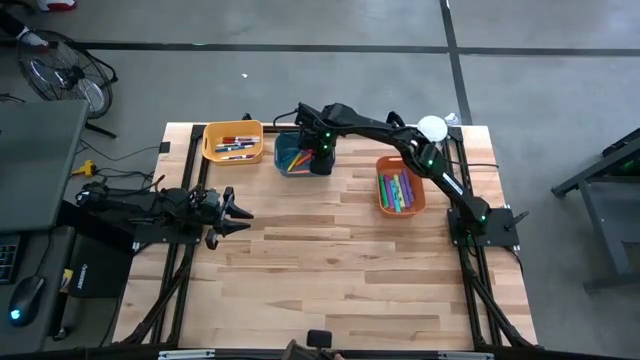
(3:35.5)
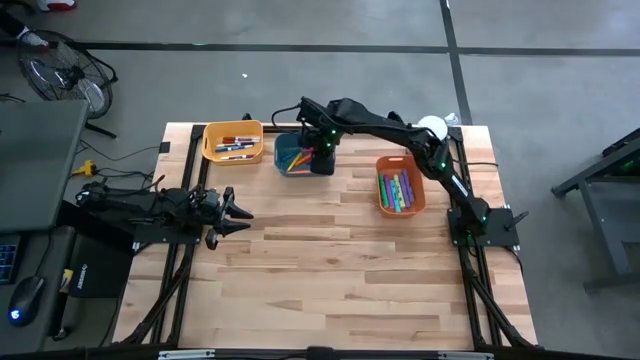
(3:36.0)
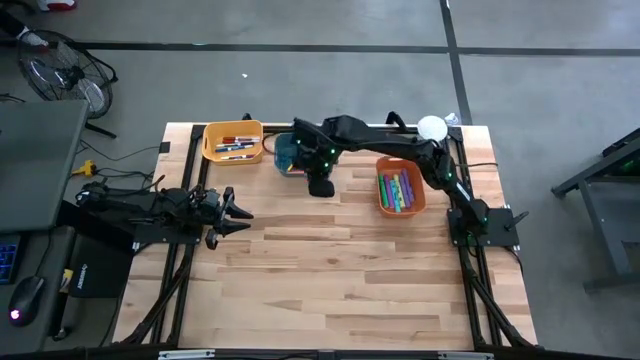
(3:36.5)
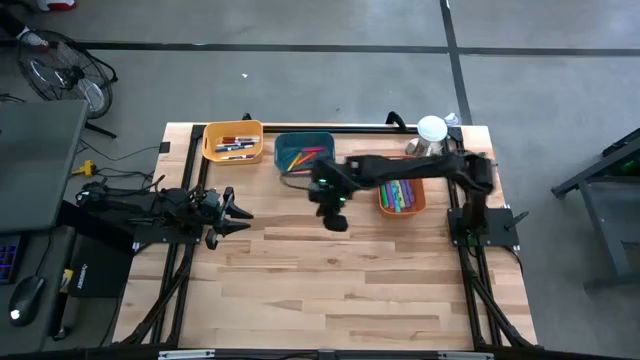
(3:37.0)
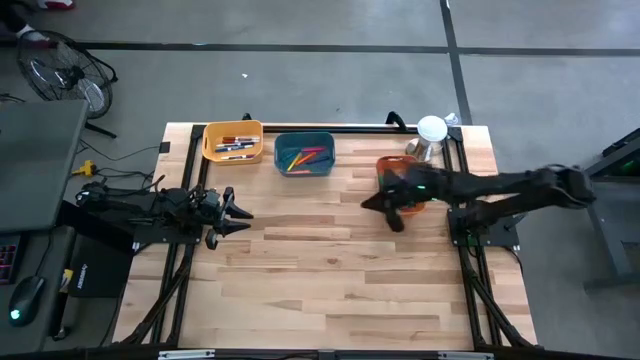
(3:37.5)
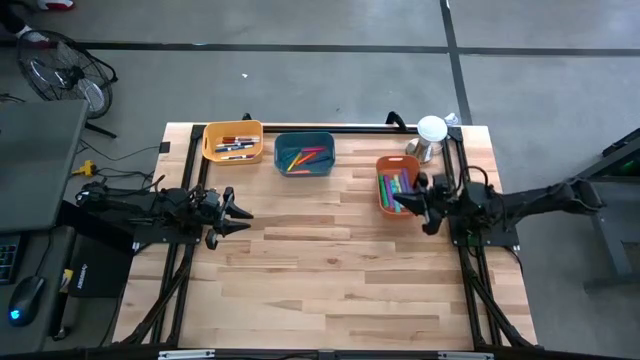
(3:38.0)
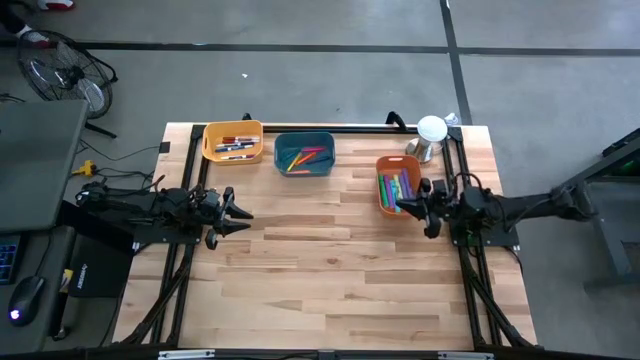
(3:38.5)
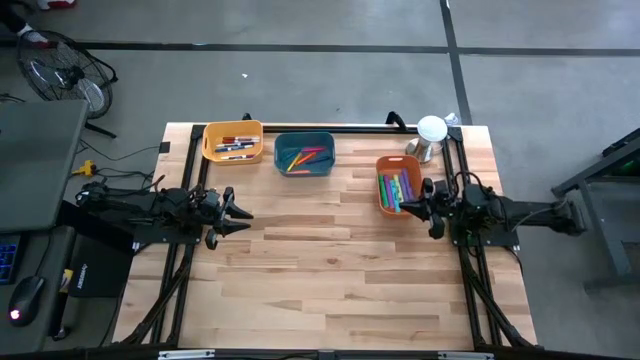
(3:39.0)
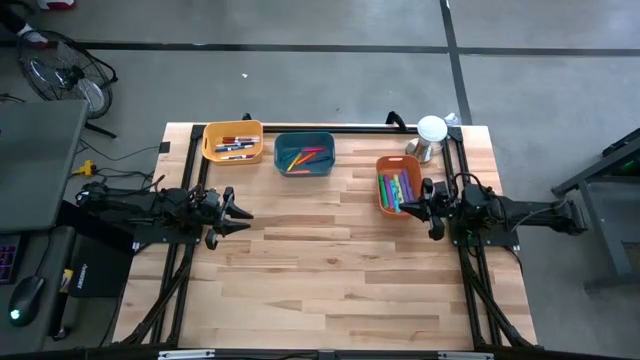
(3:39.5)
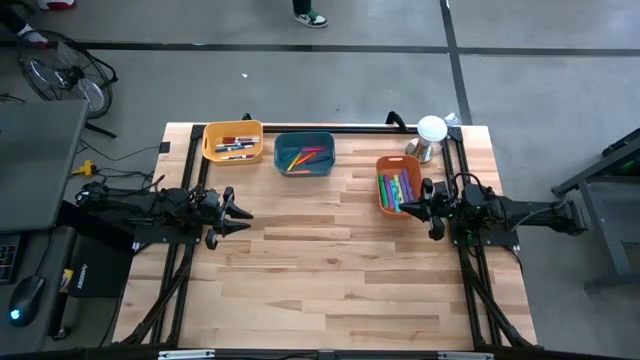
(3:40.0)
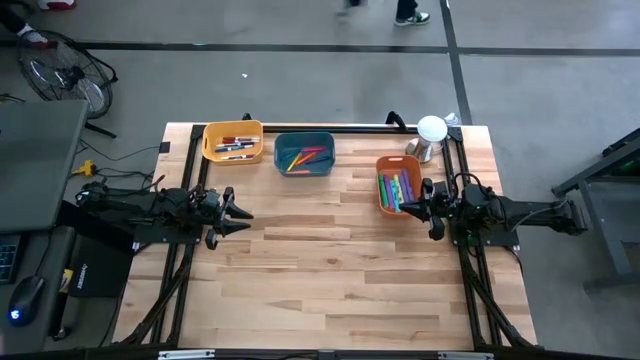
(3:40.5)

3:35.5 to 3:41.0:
Task: Pick & Place Markers
Return to Home Position

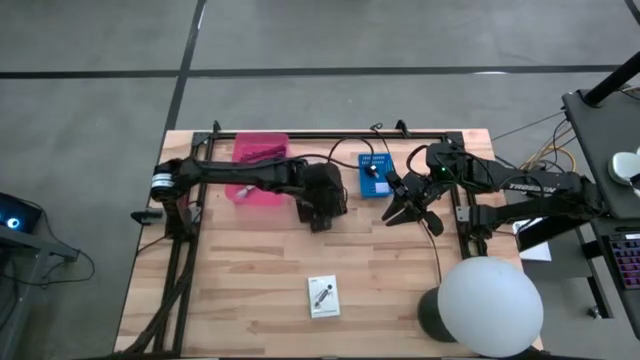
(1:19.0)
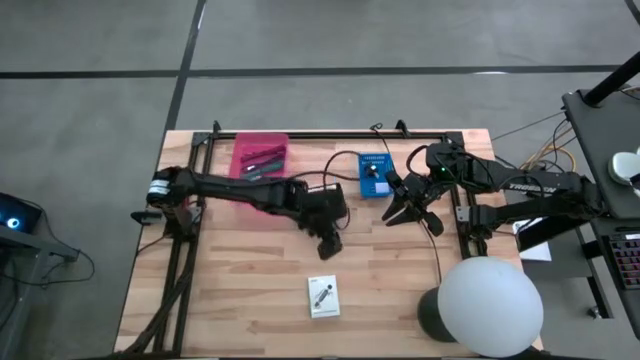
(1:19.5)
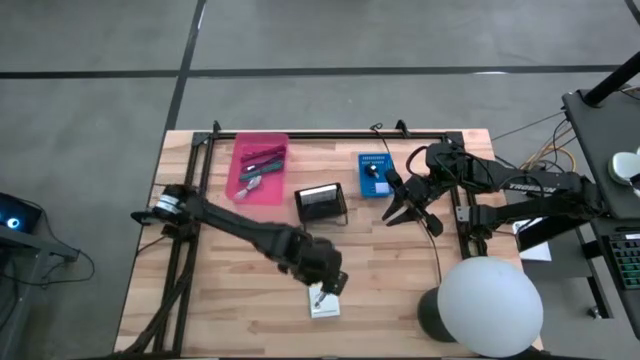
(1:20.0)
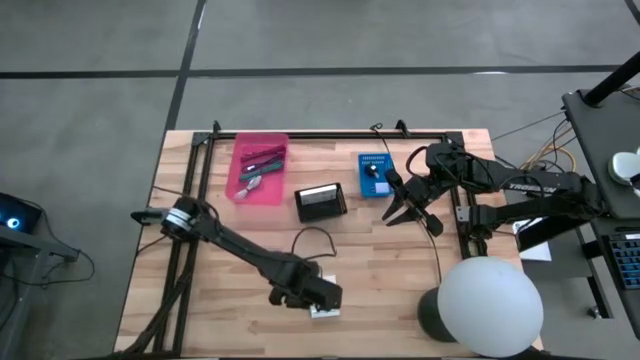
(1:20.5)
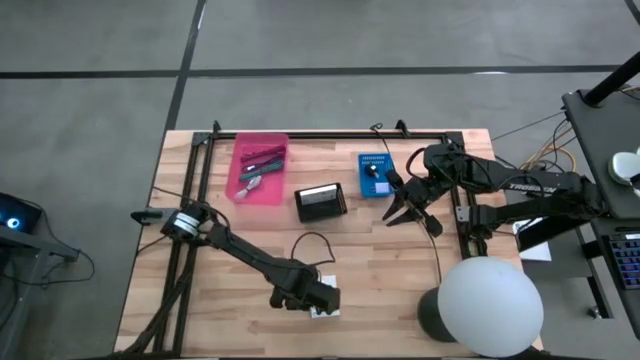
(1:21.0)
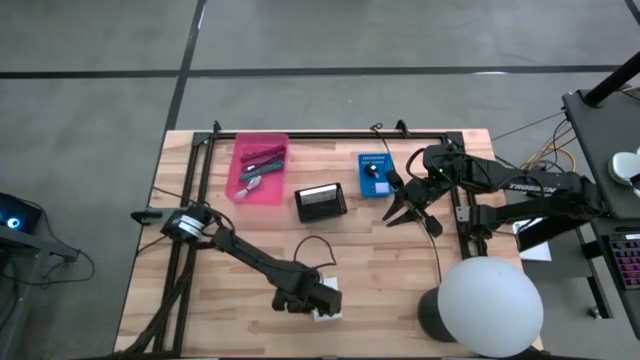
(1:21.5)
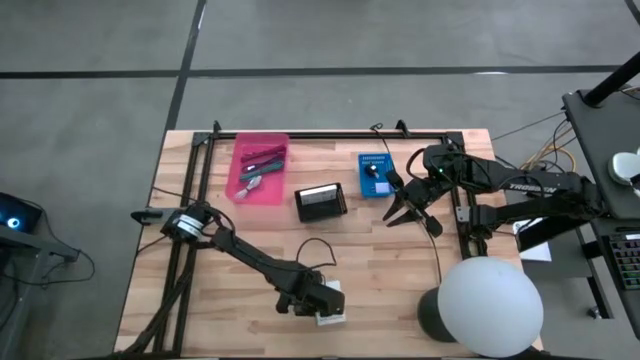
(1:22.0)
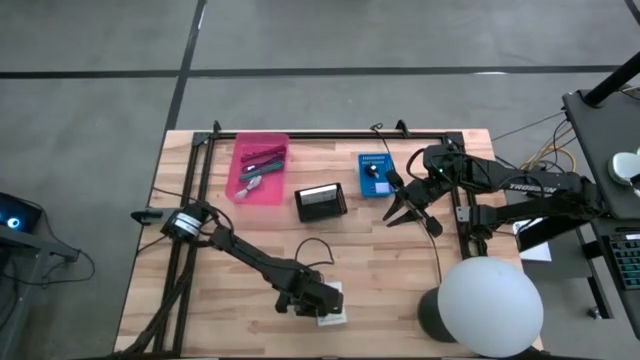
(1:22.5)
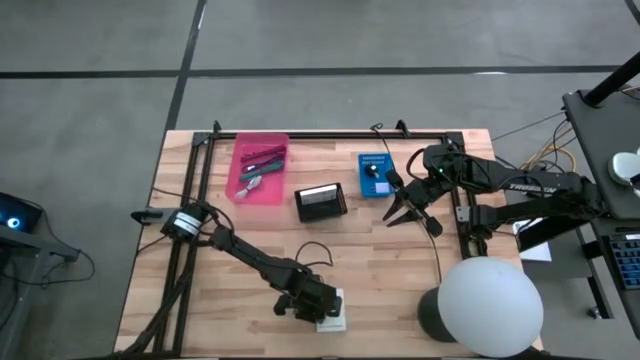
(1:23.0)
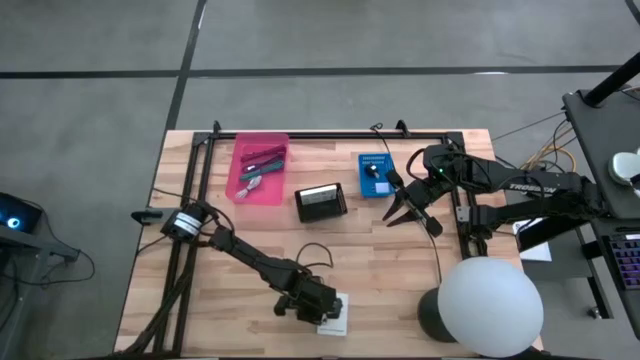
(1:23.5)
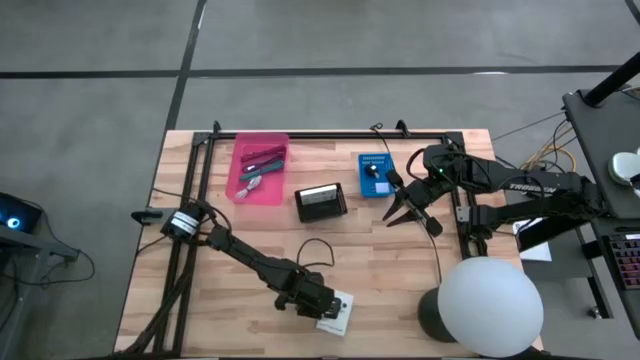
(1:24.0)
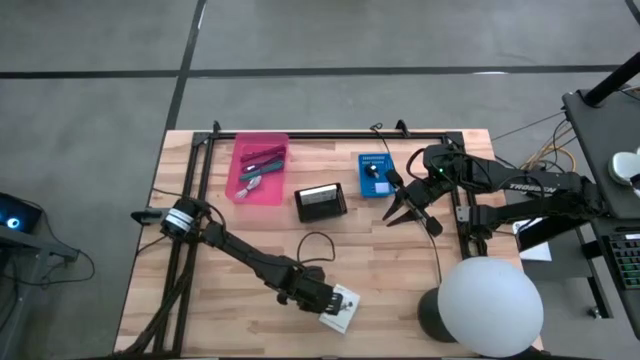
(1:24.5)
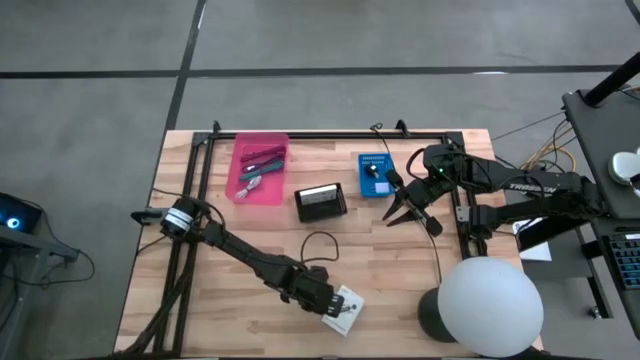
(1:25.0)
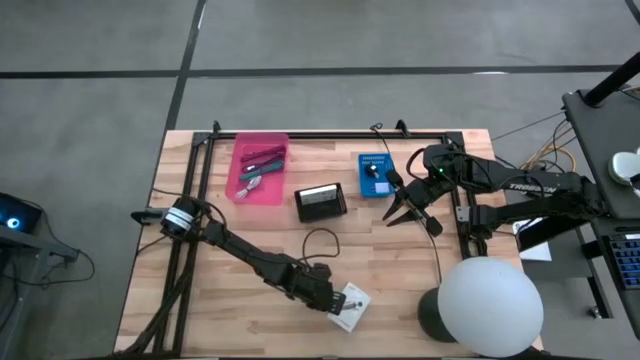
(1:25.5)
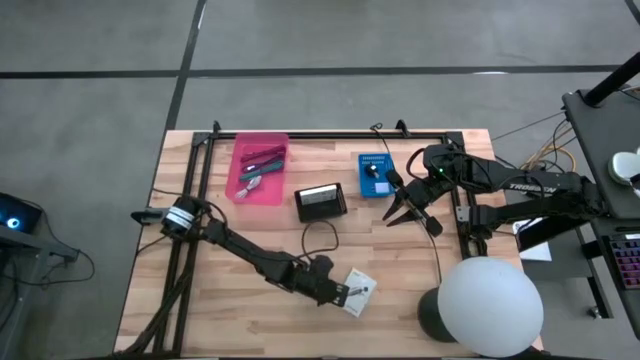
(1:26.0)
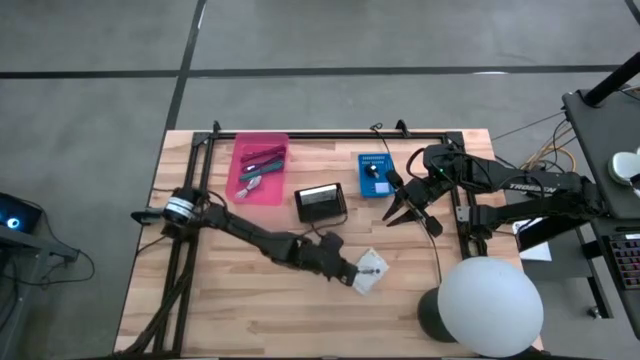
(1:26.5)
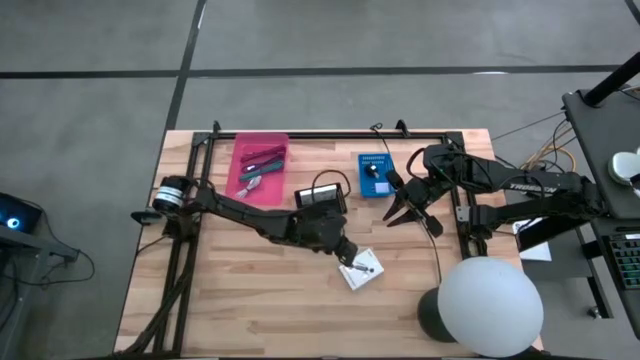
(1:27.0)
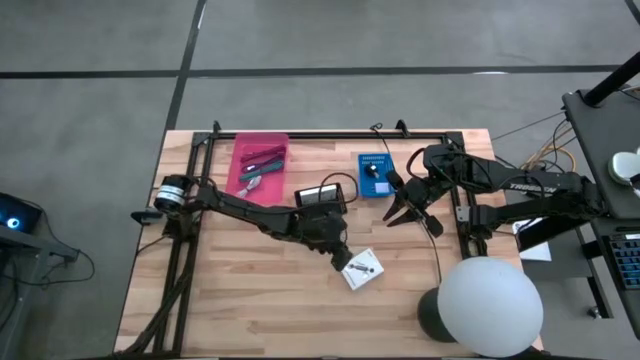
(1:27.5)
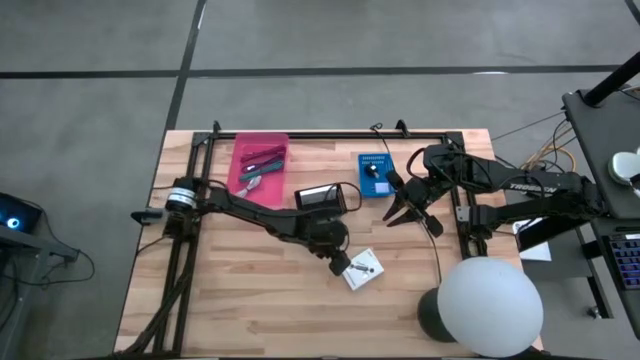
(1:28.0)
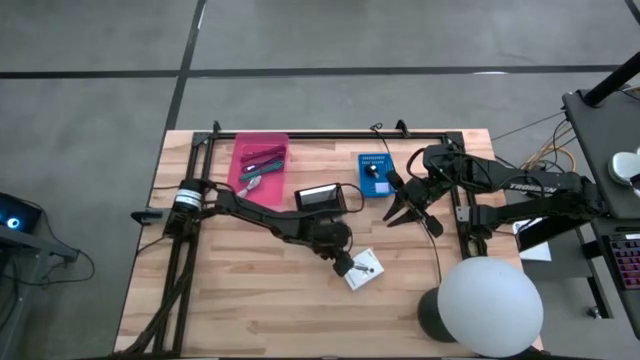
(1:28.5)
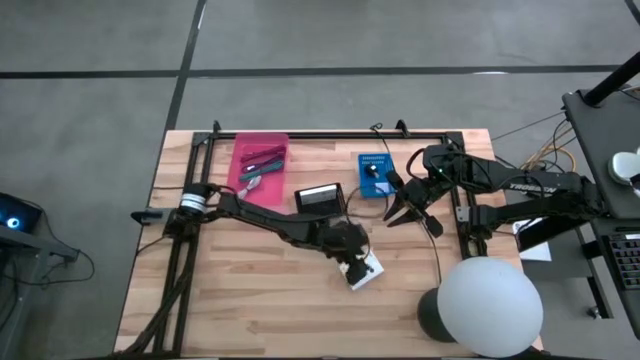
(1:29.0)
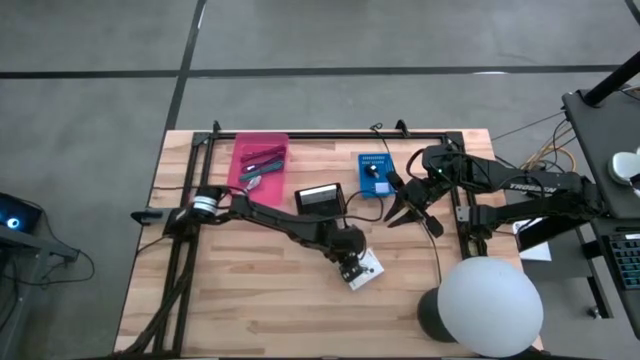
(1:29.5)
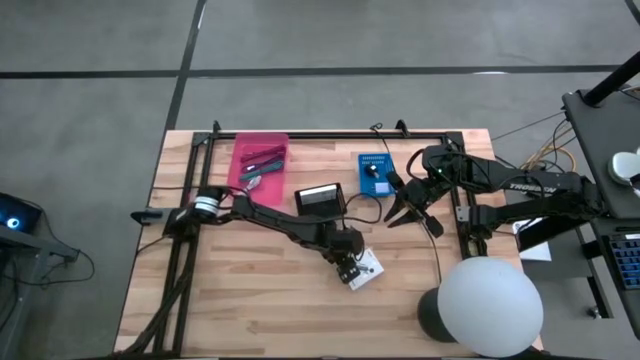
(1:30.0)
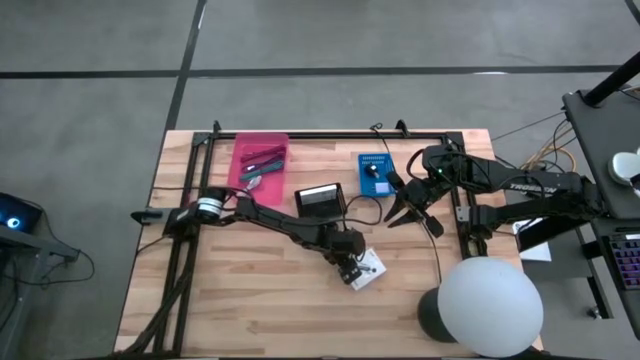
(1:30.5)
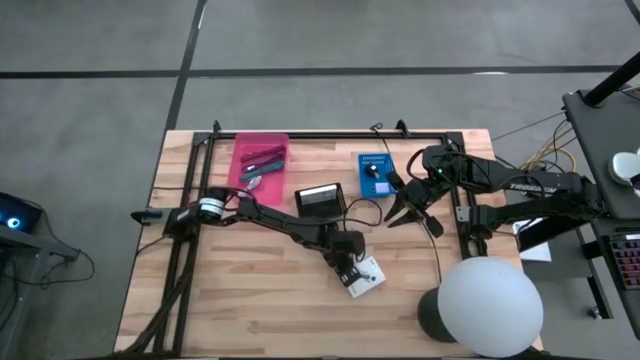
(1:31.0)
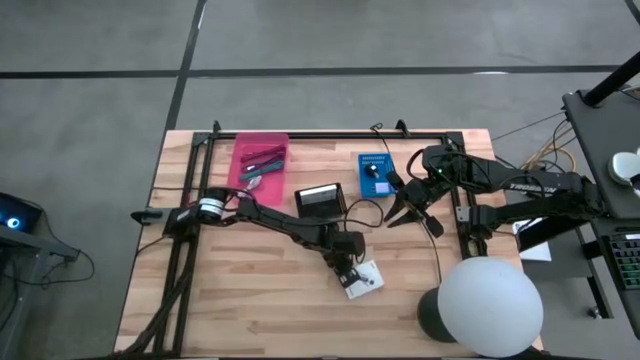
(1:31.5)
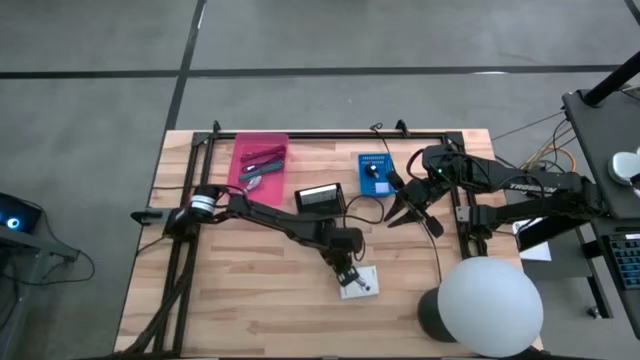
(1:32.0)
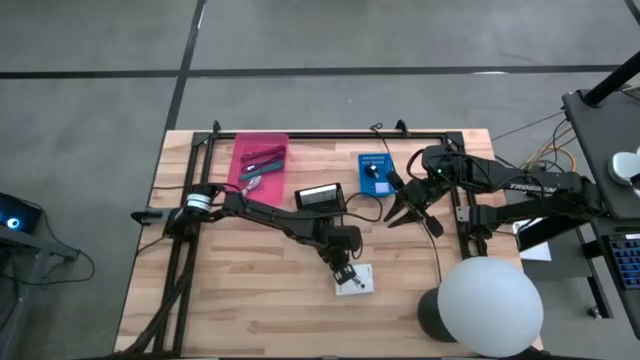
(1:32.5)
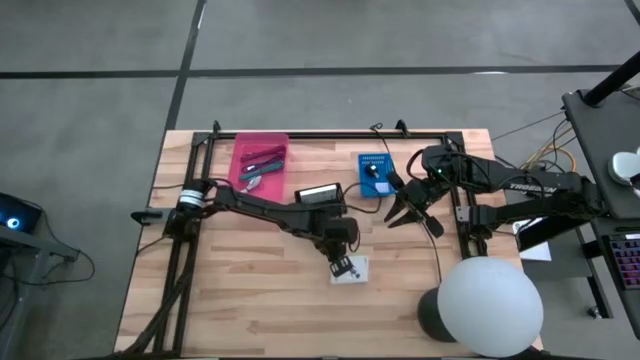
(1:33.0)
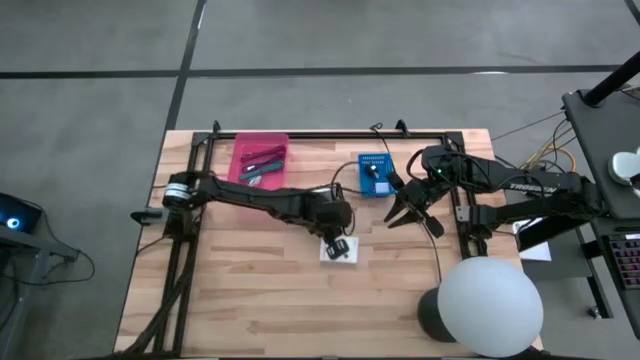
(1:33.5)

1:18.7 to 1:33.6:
Task: Pick and place items into bin
Put the white card reader box into the black bin
